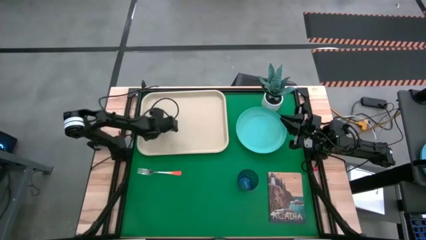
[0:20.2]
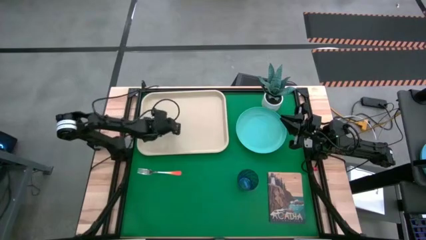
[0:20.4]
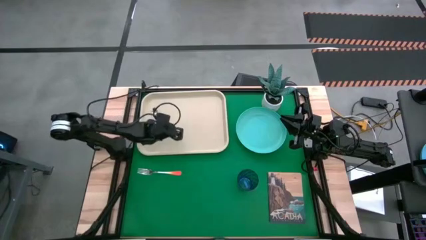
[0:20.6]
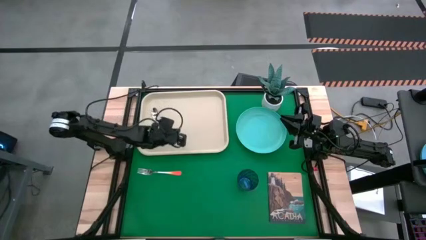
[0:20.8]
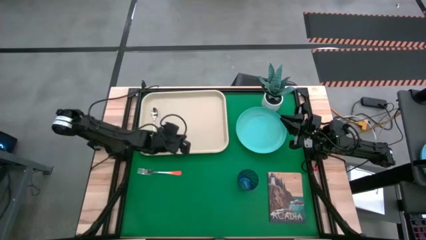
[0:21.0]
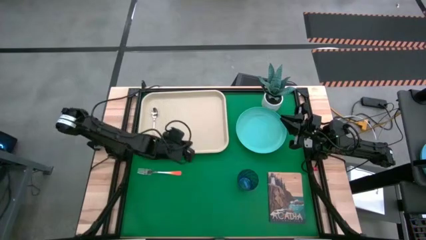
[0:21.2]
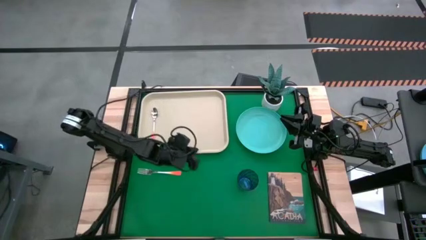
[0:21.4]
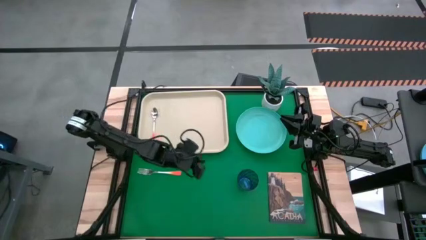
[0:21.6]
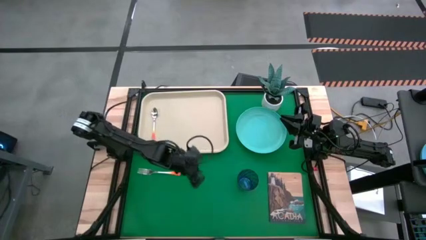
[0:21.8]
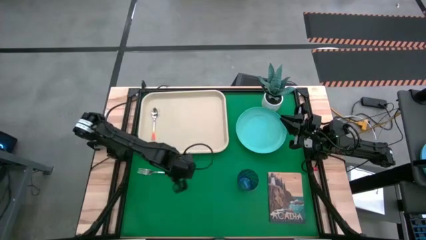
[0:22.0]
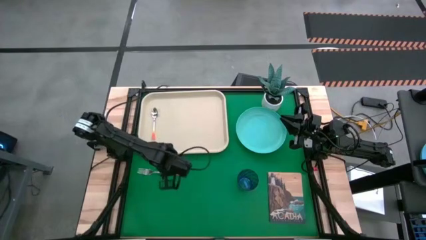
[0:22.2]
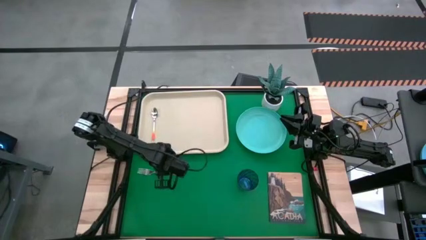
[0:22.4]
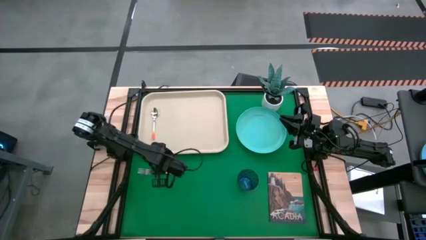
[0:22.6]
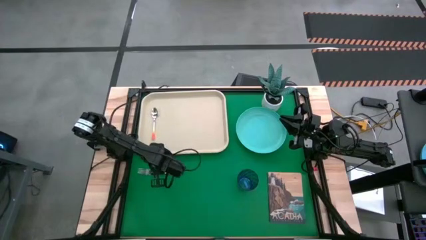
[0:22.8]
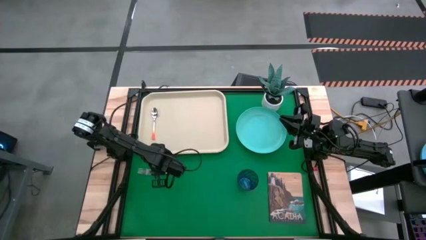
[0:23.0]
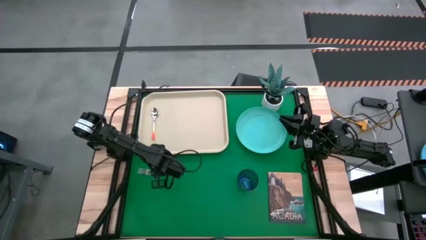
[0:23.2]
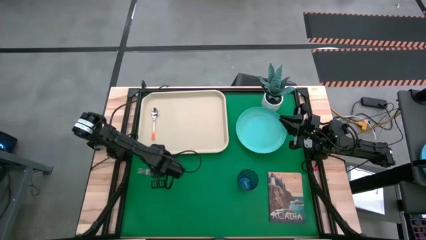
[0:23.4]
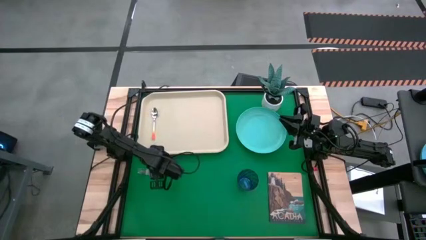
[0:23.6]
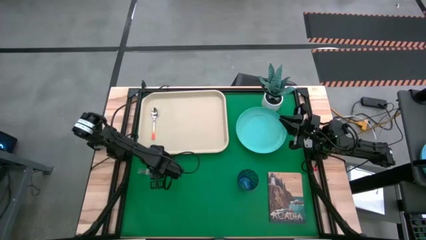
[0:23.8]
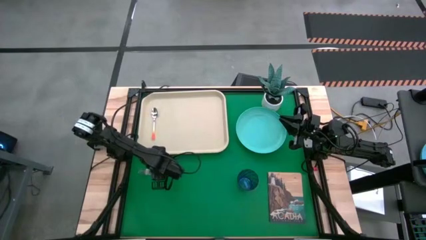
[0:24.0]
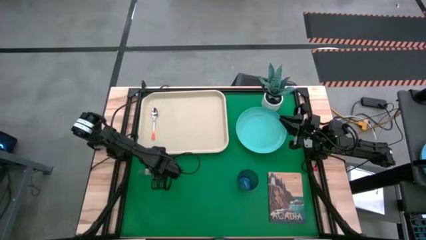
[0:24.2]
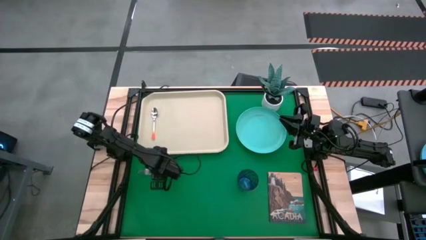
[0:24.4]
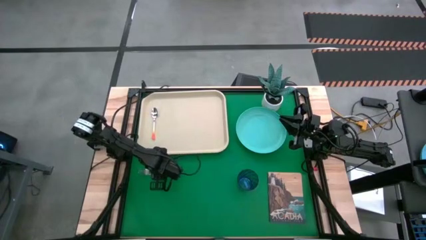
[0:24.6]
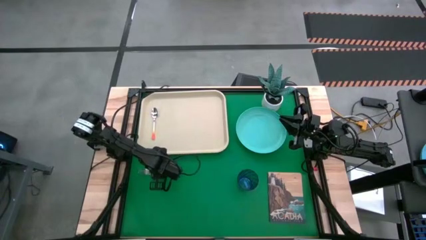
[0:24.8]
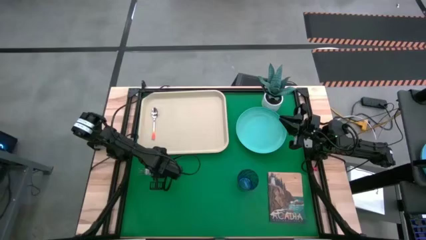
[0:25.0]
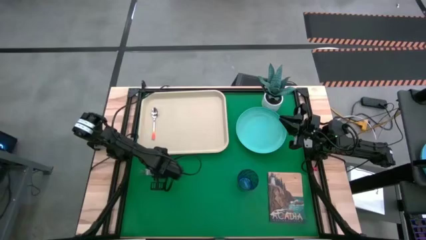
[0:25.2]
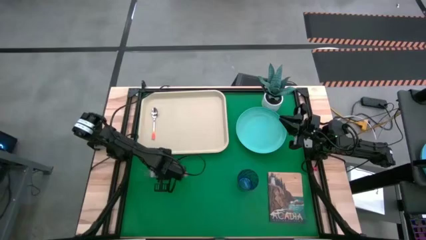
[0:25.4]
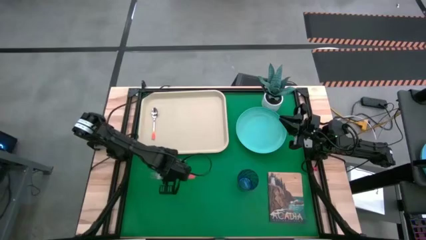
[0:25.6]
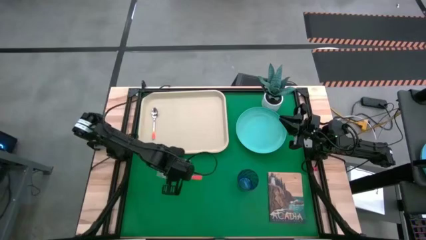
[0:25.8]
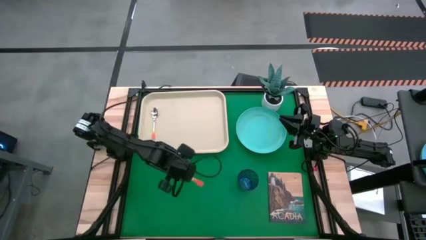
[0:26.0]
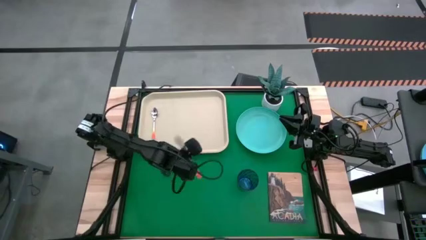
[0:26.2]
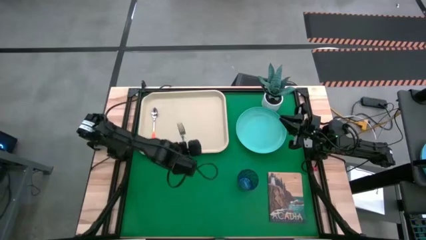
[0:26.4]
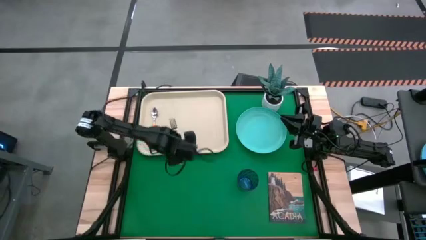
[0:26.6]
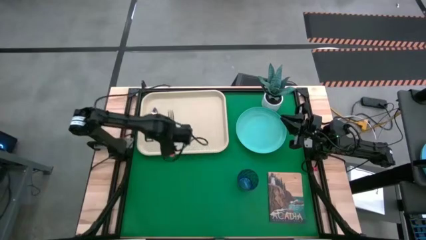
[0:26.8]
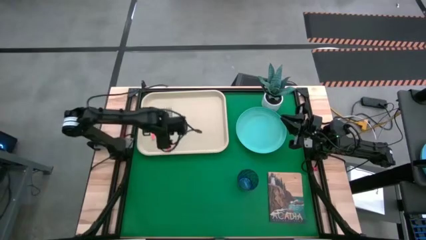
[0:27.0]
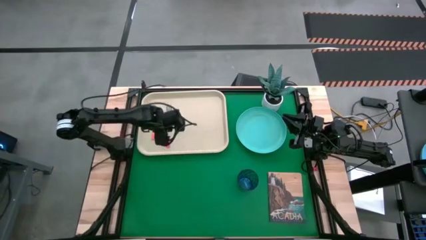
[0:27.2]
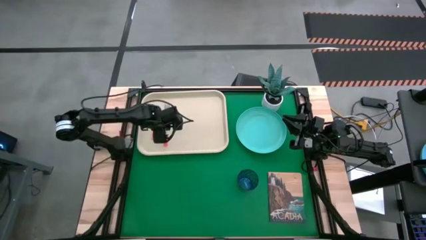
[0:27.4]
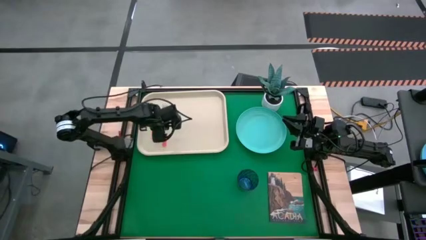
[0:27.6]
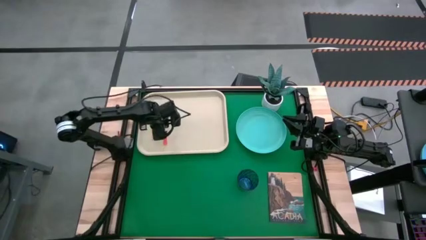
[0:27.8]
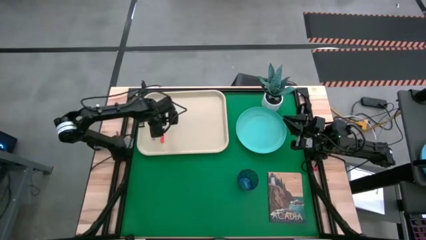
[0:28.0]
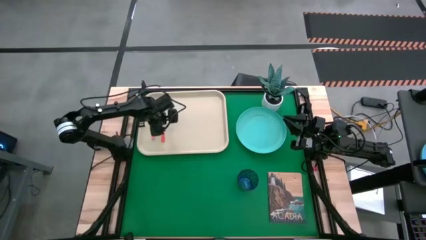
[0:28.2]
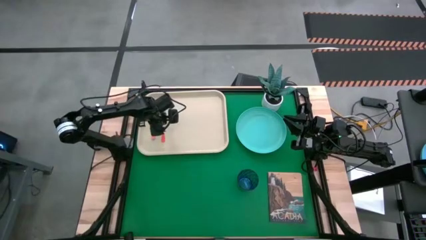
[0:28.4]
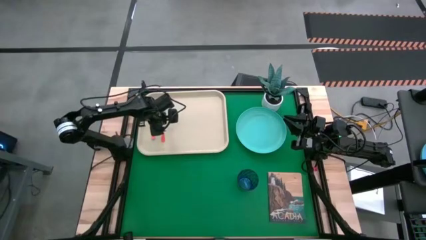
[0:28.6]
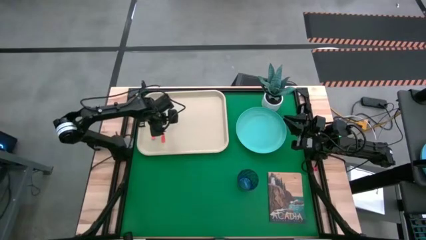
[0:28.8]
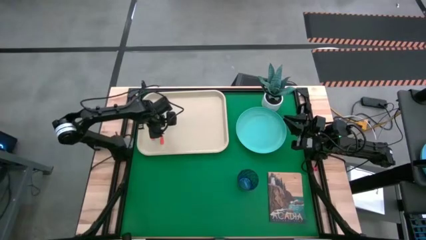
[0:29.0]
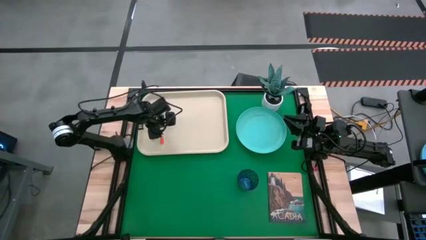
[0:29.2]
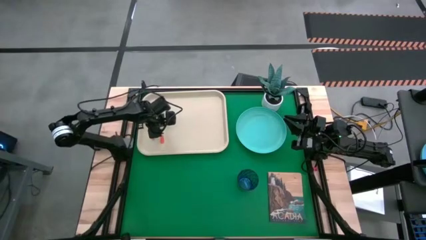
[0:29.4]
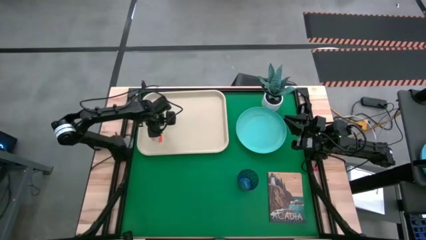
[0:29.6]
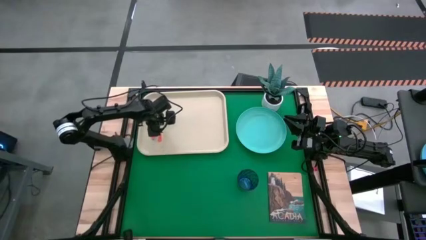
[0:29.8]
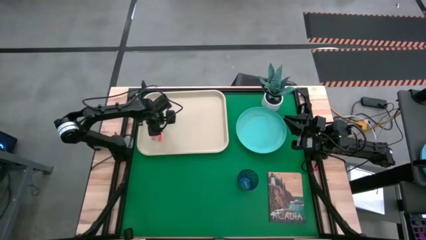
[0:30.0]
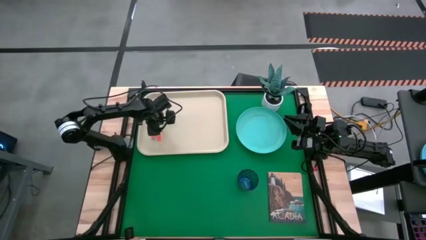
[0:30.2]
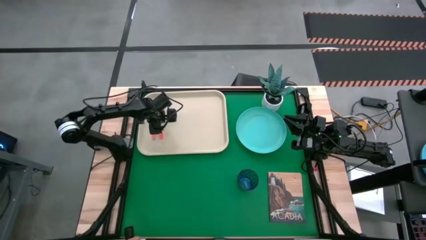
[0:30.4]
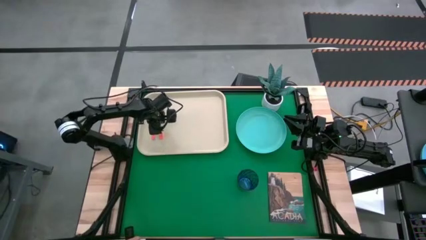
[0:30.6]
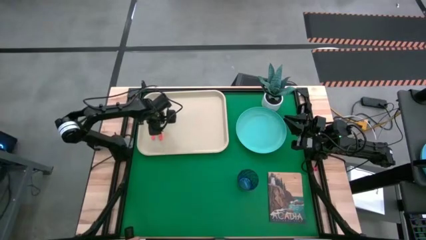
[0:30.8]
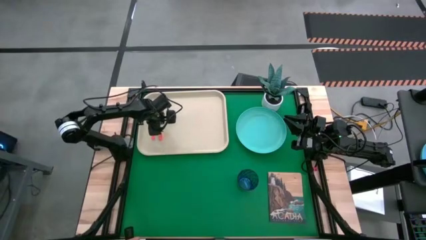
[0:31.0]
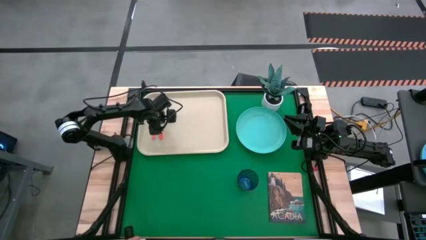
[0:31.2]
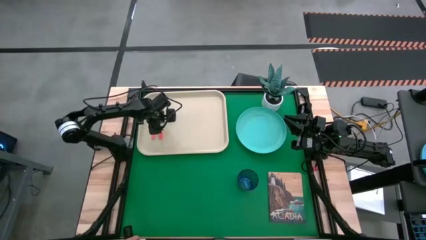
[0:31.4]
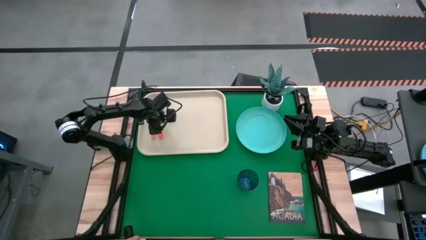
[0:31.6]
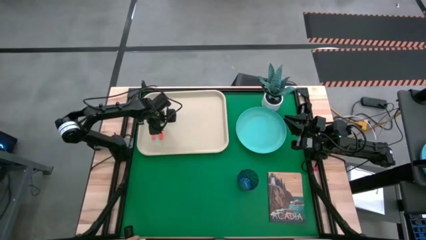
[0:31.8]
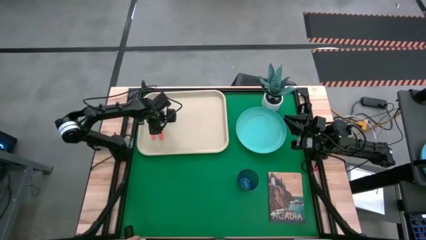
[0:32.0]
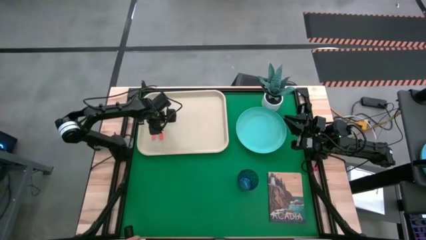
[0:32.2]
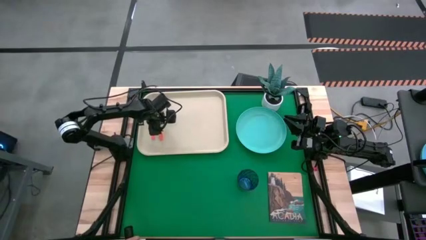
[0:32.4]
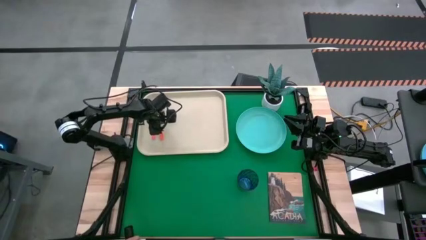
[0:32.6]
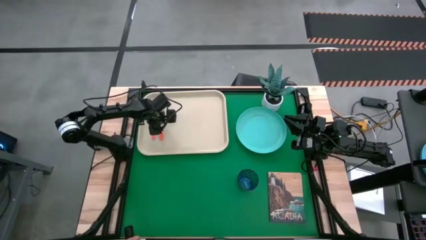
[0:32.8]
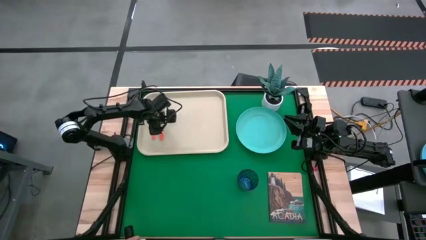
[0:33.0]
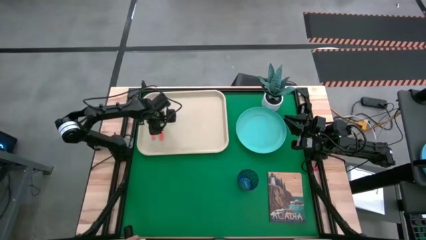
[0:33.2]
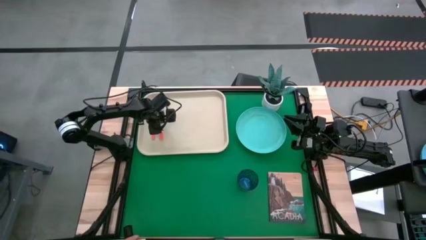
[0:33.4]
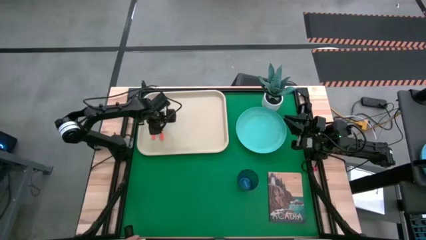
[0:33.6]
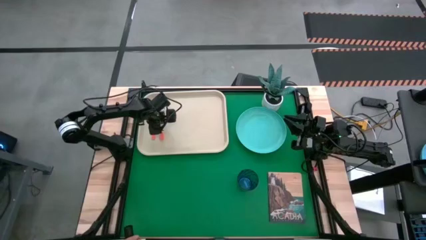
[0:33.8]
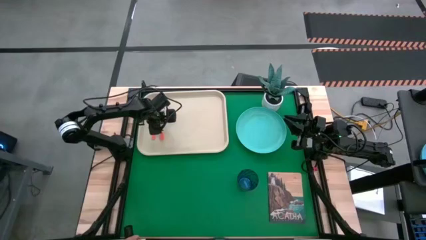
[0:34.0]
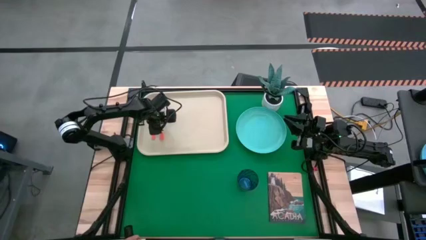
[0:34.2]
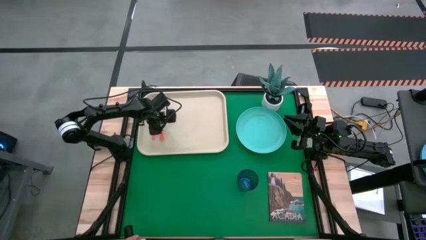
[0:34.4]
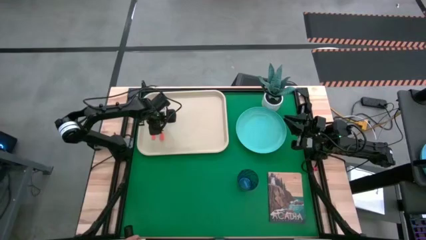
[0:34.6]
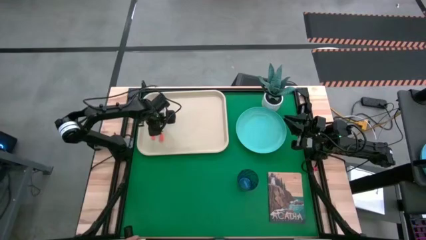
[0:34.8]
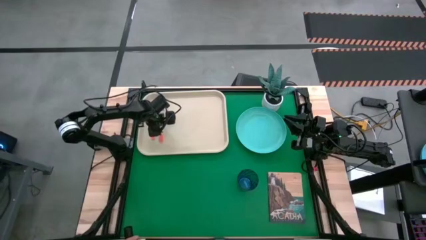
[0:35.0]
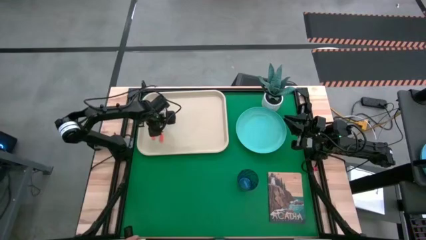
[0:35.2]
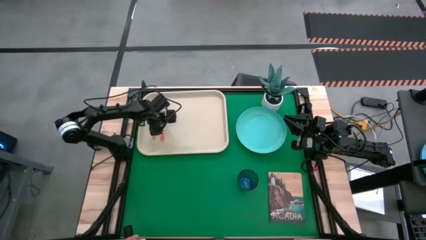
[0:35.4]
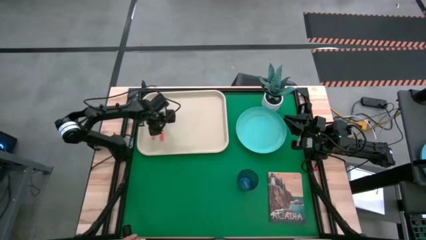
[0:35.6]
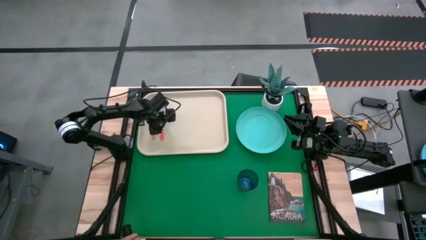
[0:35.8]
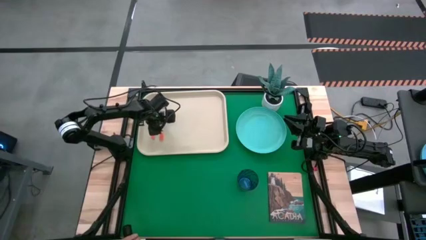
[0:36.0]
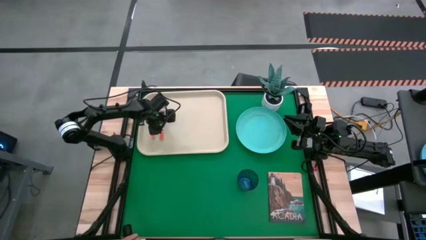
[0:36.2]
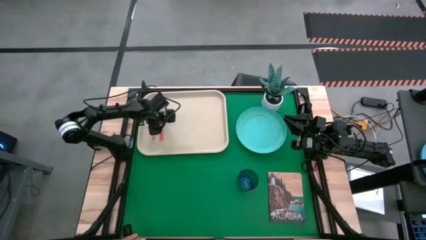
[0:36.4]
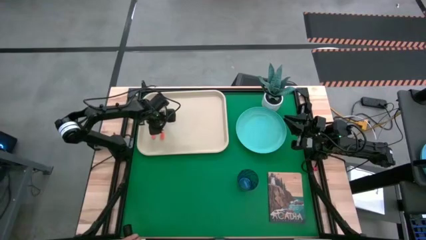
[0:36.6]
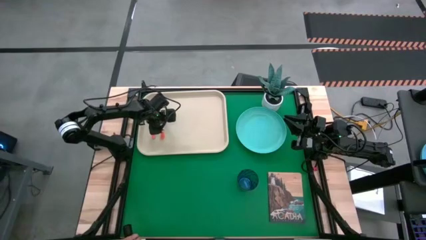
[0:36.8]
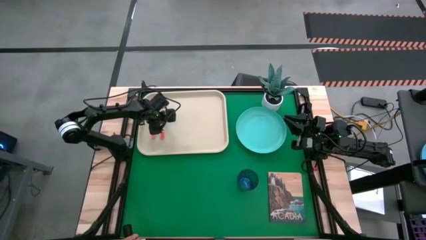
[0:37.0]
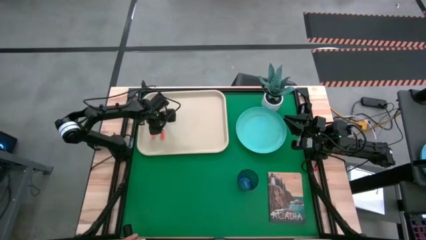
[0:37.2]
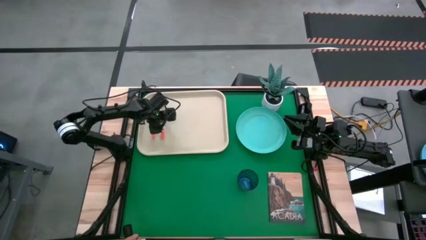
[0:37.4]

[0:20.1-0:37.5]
Task: Pick and place plate/cup/fork/spoon on tray
Put the orange fork on the white tray to the right of the orange spoon
